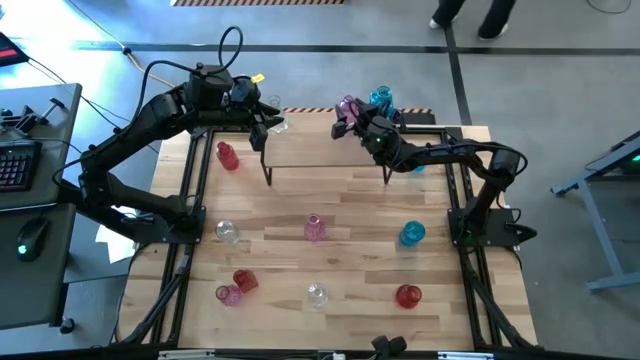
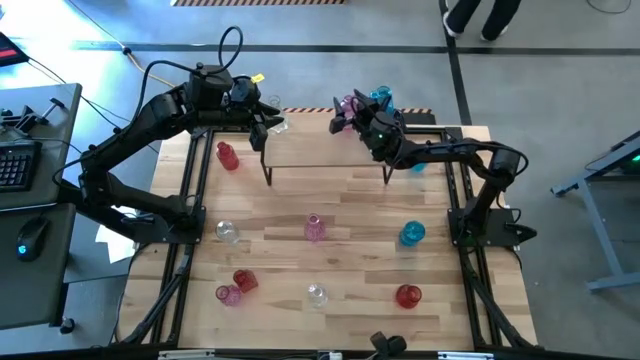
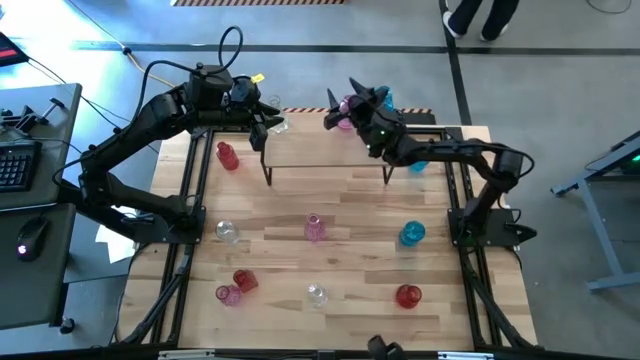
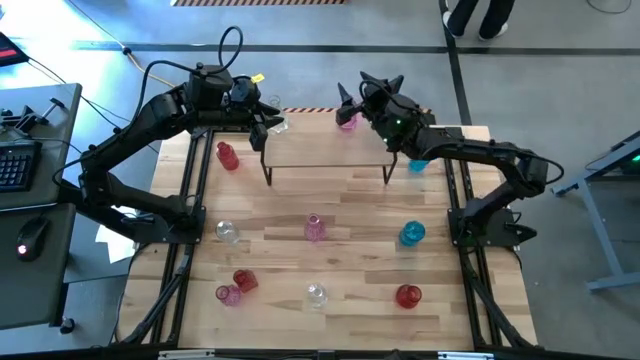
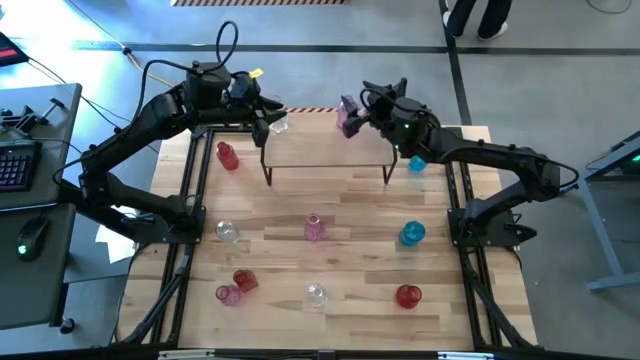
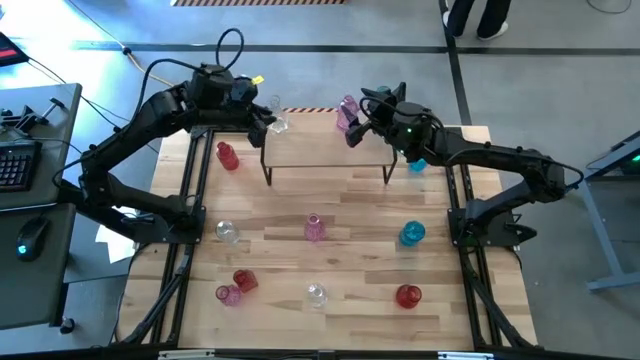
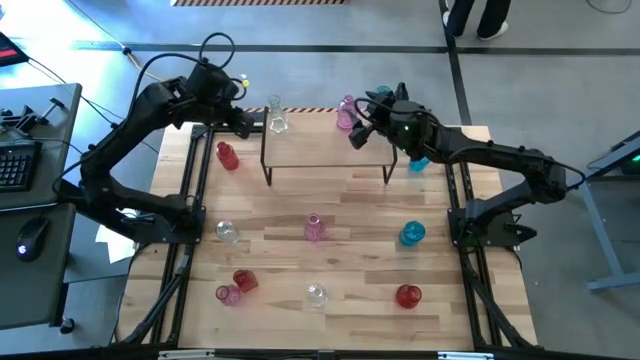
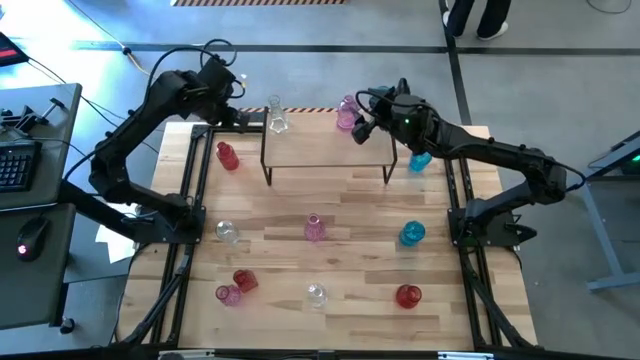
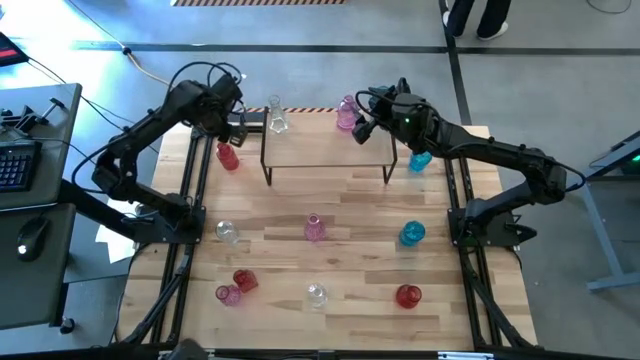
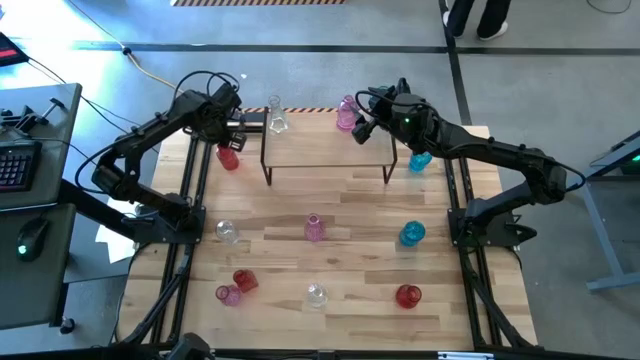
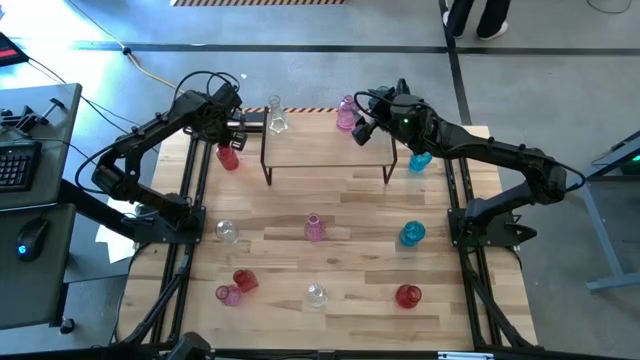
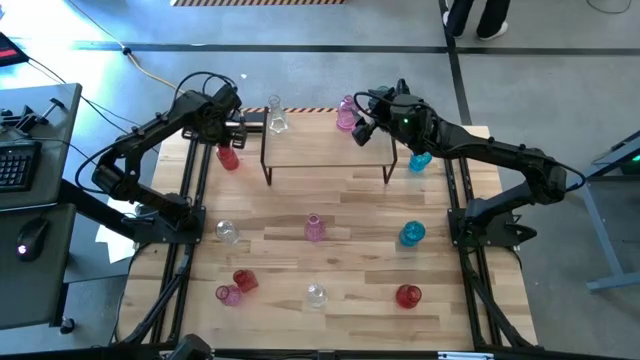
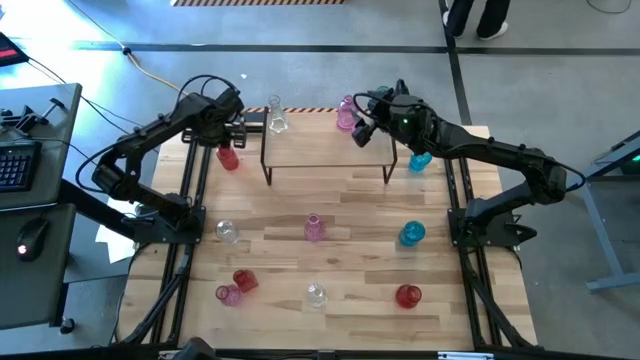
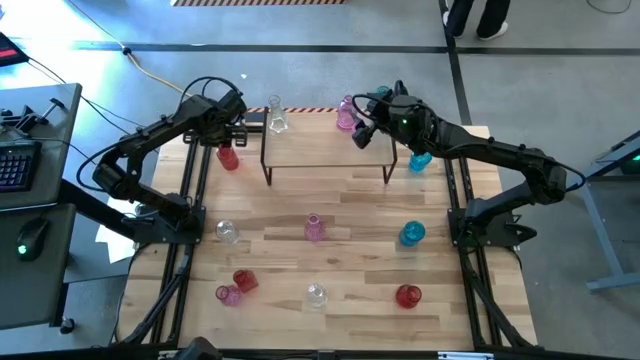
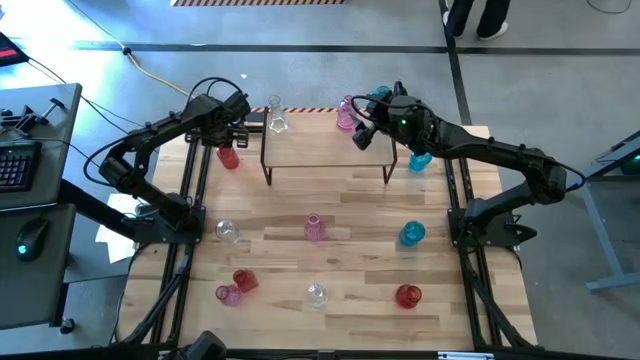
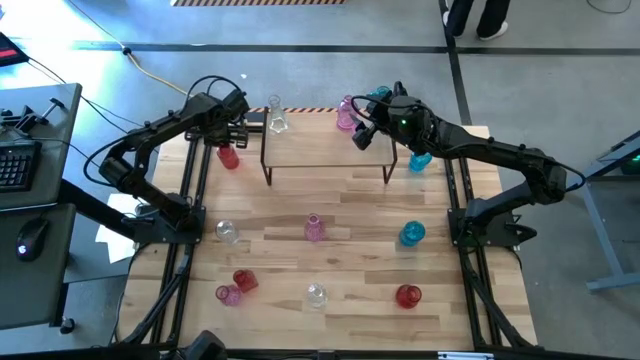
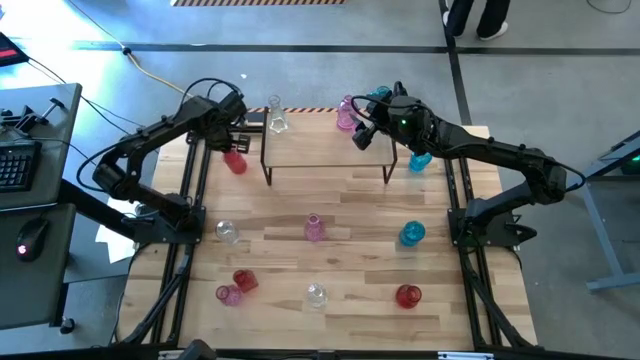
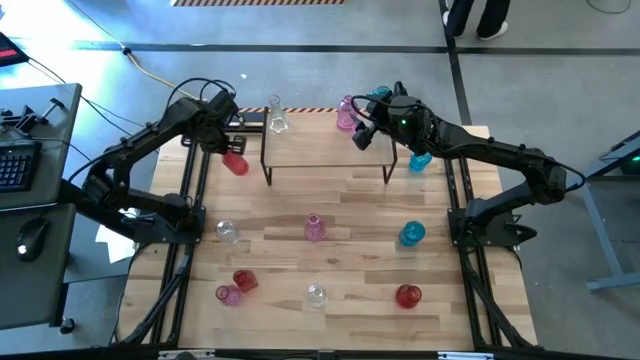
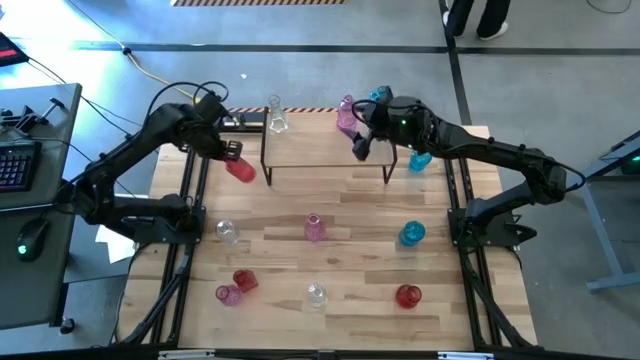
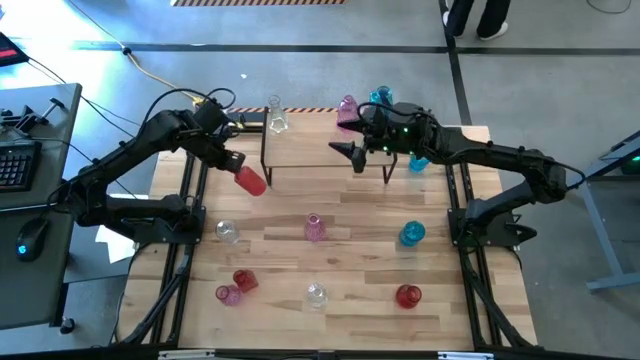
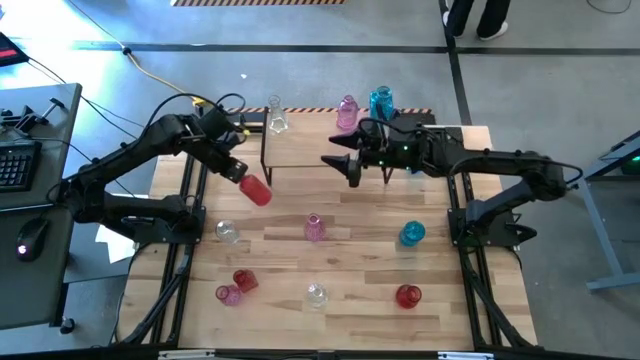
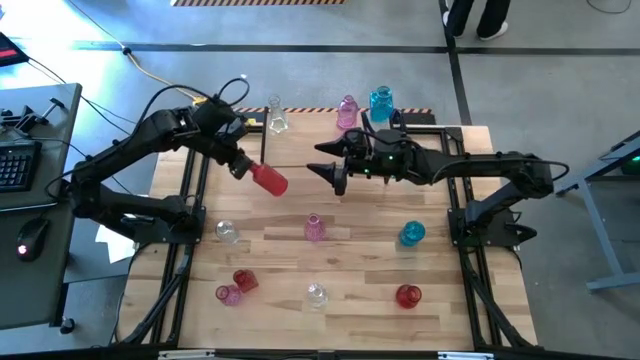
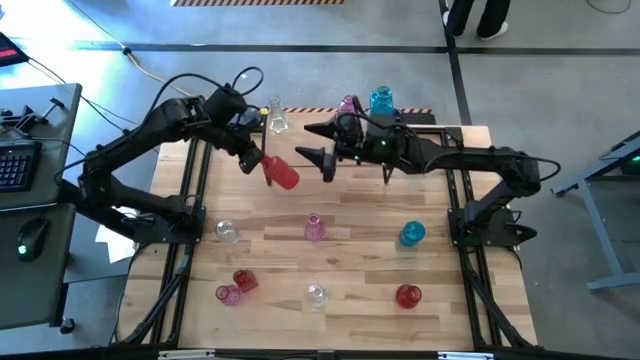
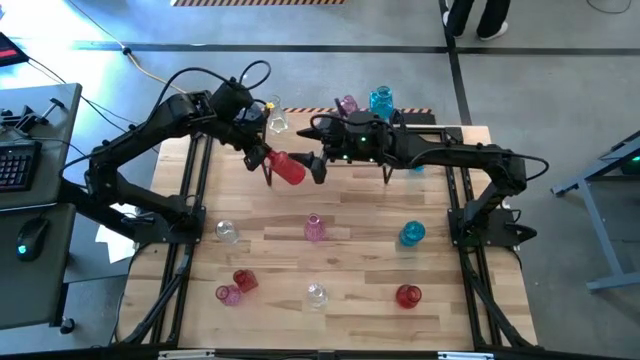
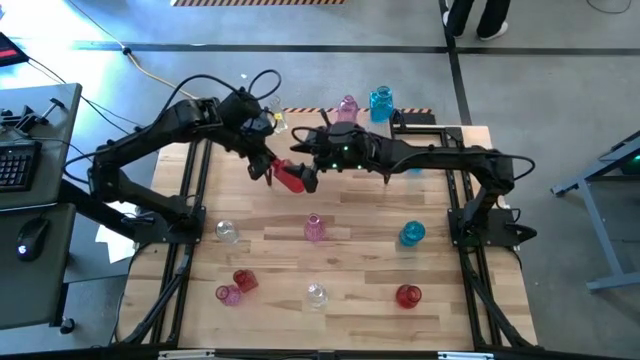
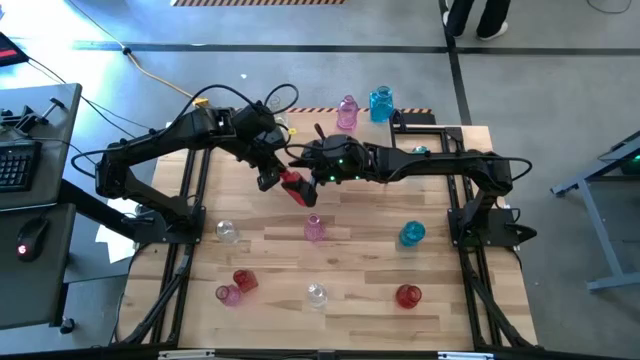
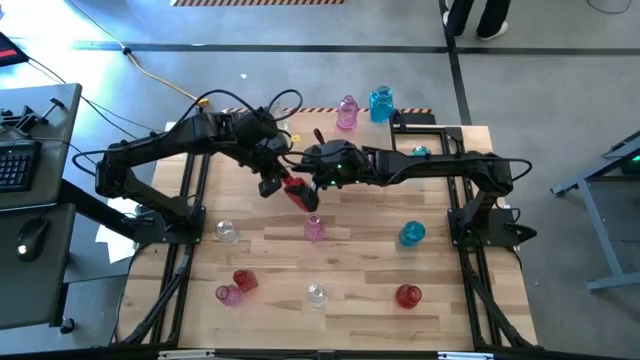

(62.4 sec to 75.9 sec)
Task: sort vases onto shelf
Put the top red vase on the shelf
